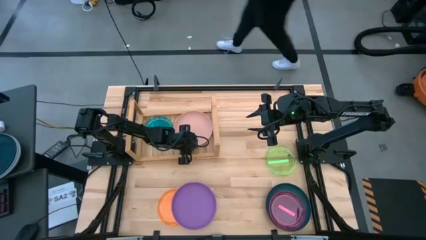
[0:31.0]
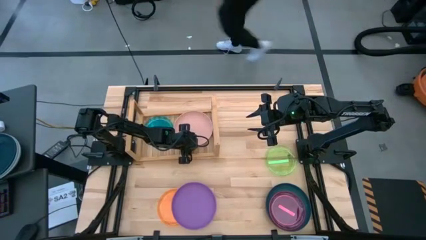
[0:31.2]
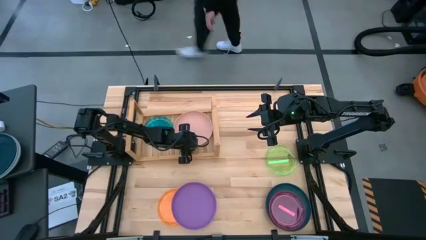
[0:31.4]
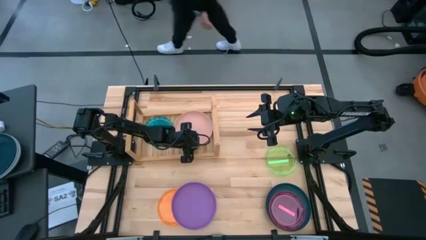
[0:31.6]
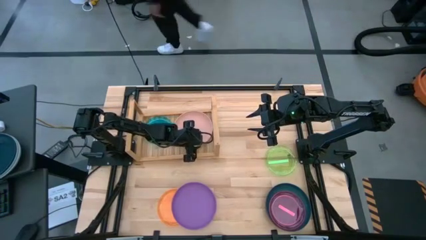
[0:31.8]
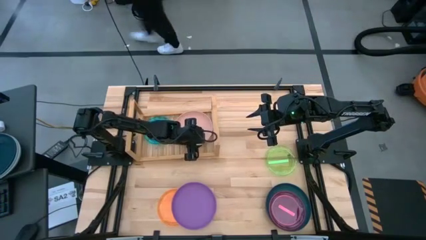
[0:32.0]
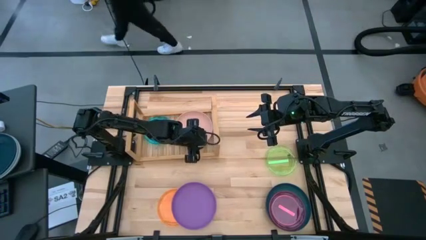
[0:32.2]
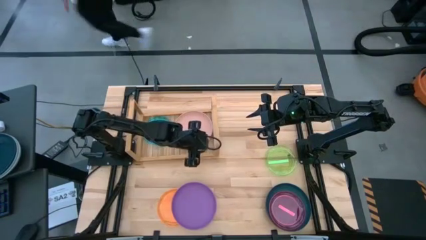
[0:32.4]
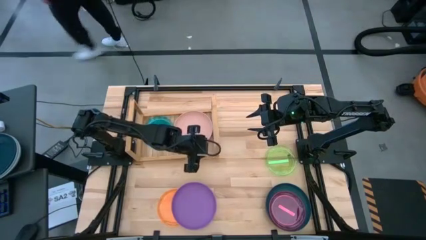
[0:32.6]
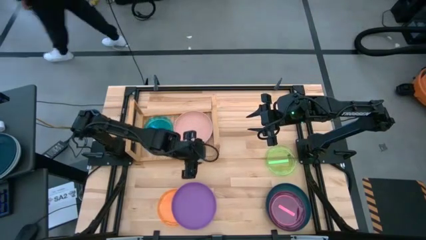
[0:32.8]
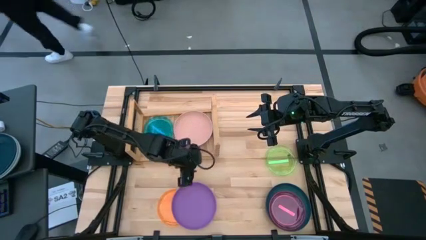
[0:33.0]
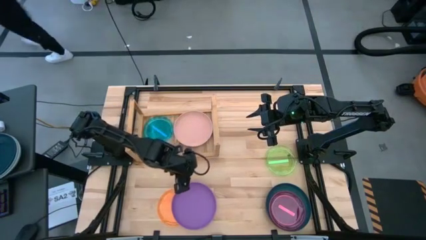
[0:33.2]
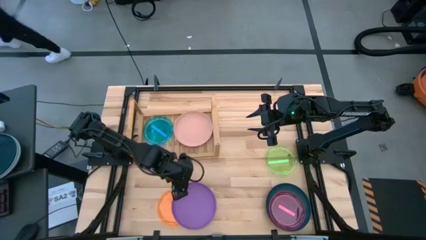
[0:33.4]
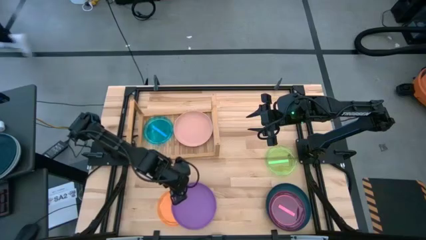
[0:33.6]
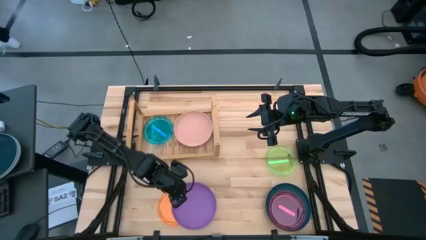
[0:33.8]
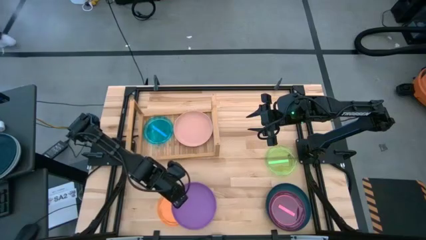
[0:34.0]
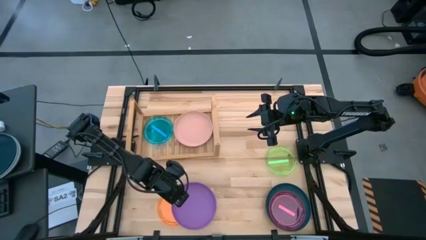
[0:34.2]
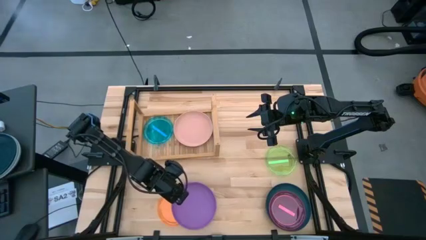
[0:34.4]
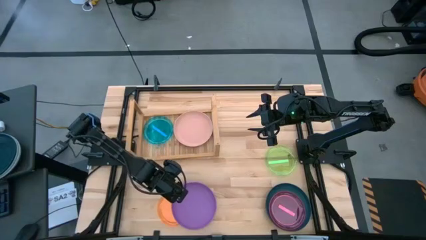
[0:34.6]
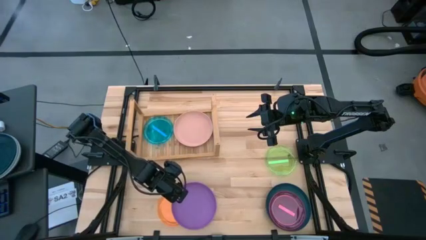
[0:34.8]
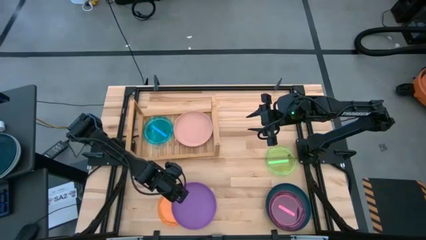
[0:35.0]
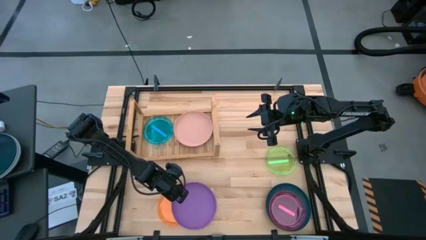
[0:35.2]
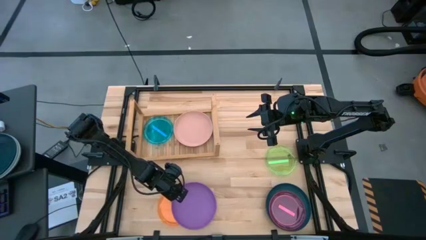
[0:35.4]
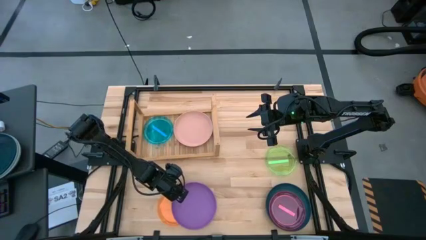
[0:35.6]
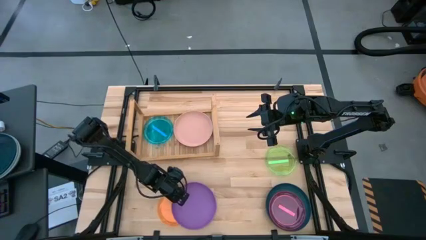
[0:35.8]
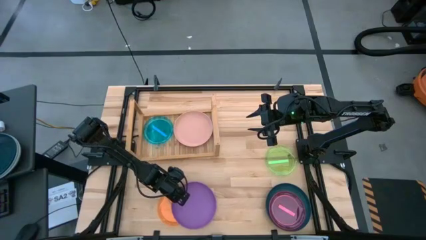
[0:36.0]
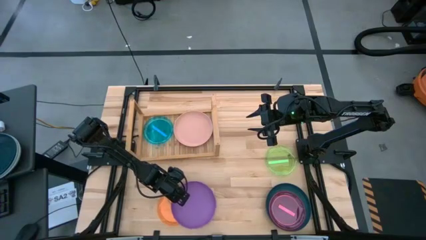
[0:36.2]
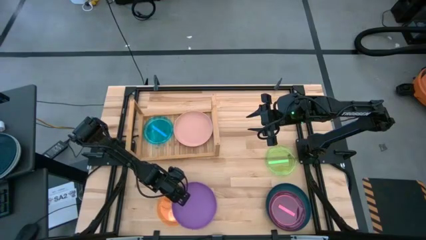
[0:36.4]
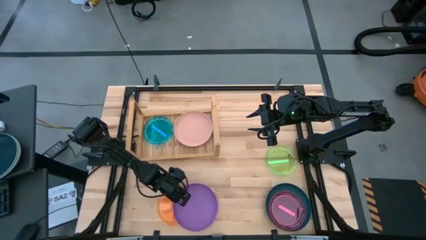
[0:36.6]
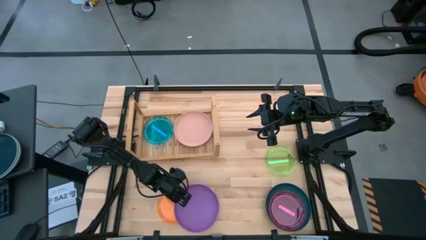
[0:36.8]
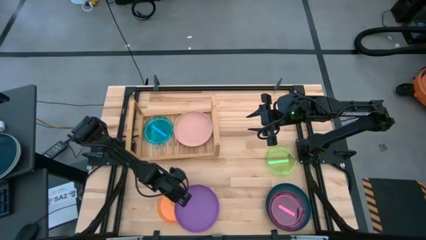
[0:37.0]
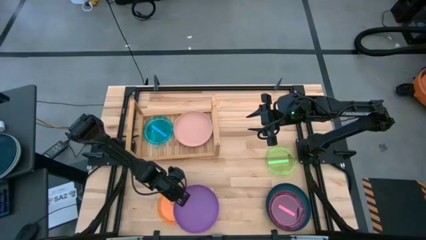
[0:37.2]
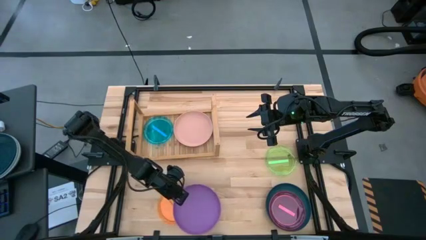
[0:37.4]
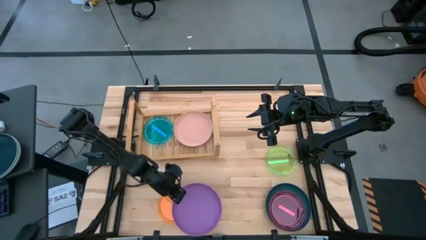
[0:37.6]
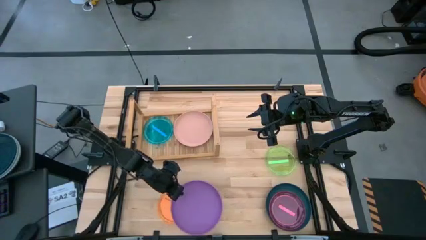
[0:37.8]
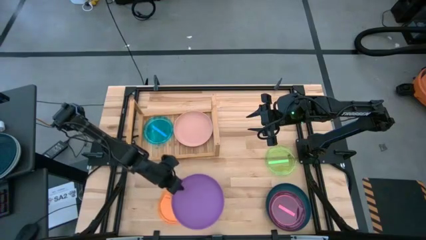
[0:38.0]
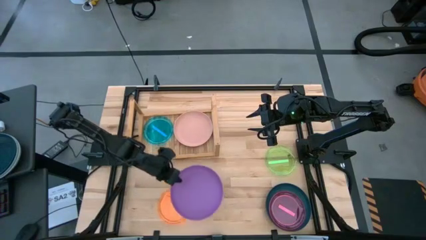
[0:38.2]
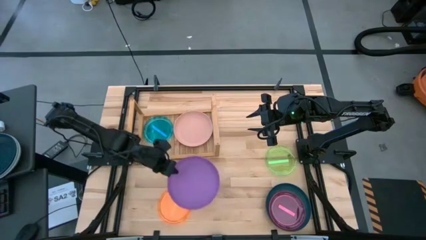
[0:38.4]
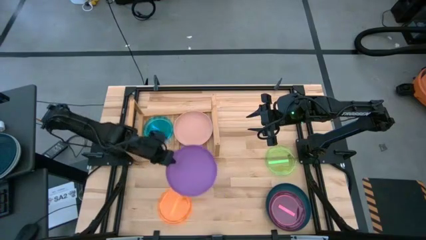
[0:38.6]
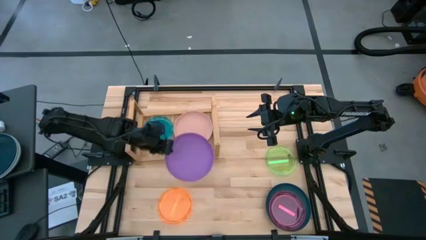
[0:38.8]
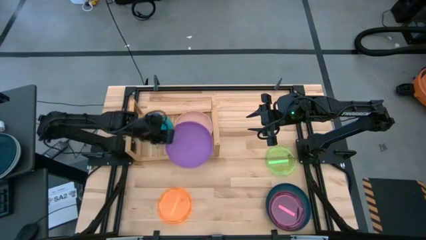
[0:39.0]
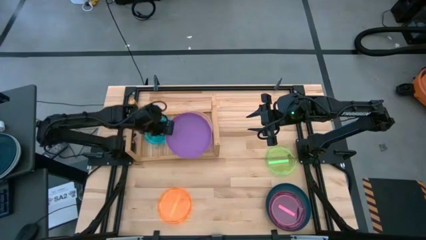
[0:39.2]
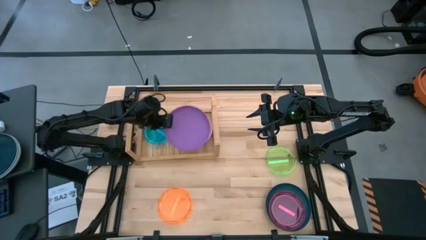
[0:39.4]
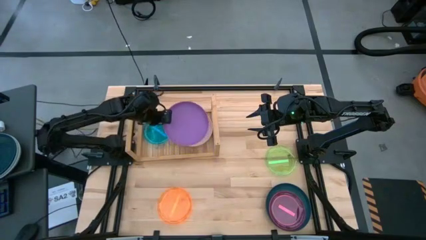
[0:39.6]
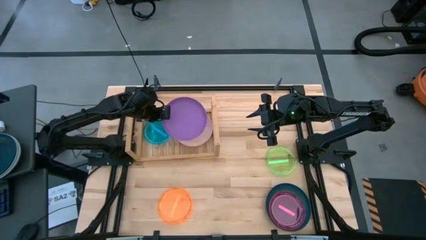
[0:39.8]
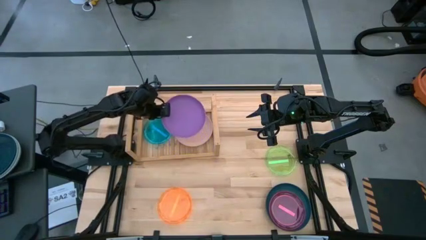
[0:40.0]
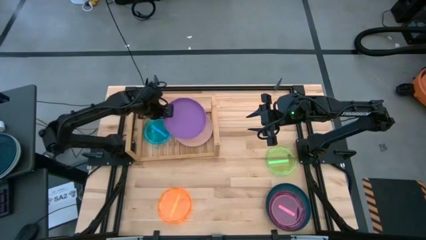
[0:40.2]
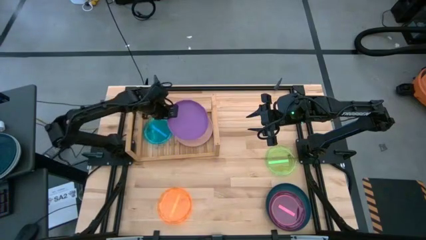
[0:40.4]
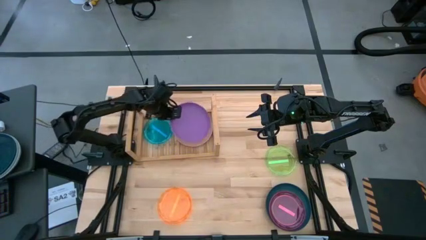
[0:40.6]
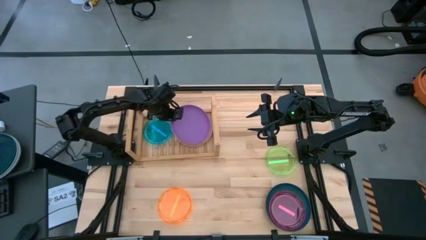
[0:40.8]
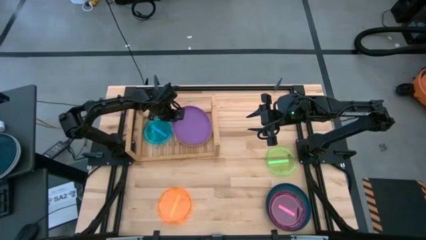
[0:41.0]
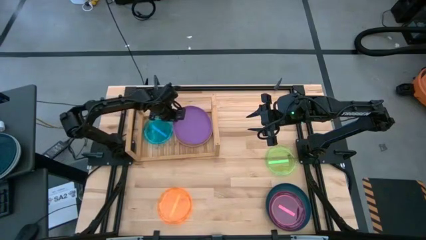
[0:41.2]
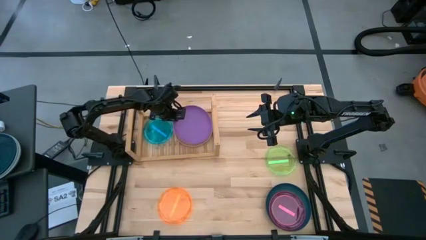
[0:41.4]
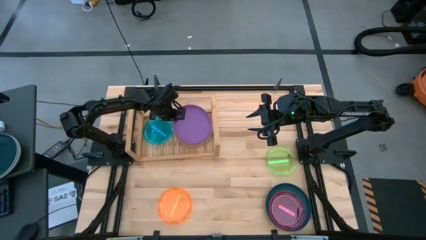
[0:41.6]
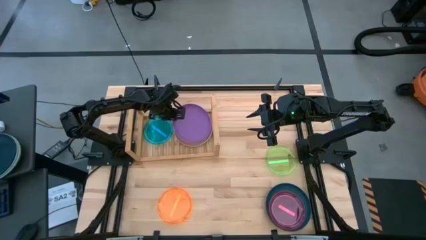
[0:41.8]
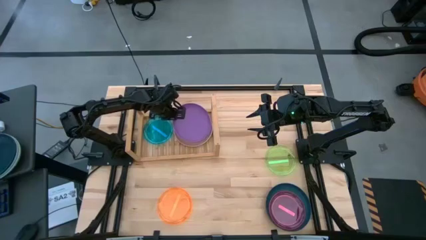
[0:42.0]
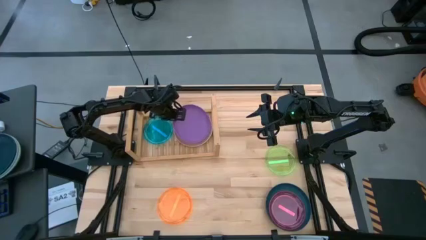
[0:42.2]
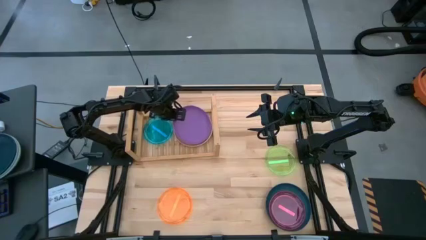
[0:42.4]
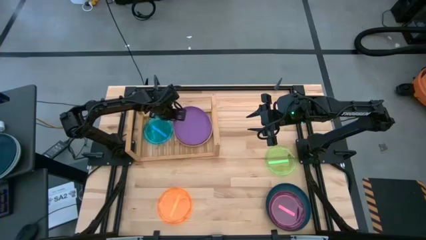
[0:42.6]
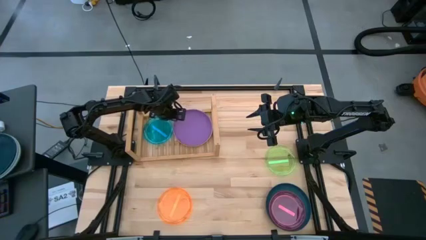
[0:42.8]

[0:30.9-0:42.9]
Task: Place and stack plates onto a shelf
Stack the purple plate on top of the light brown plate on the shelf
